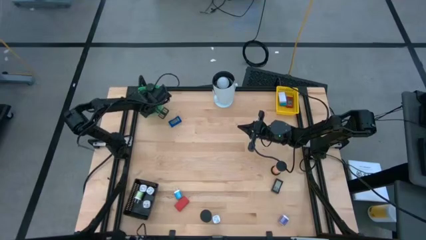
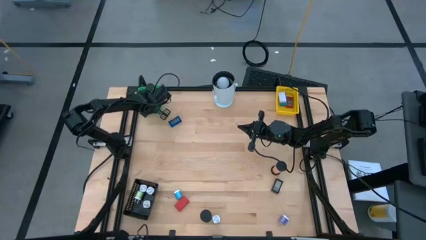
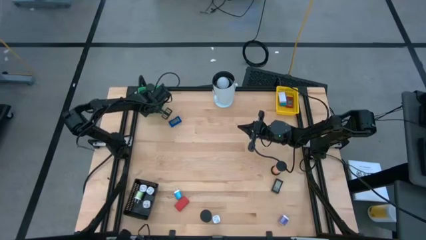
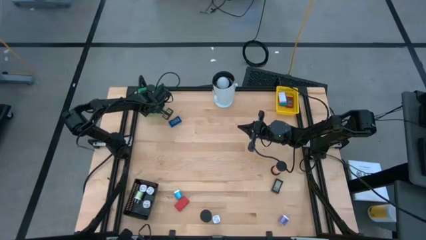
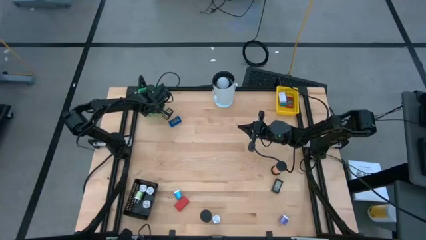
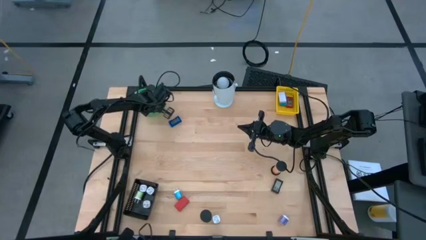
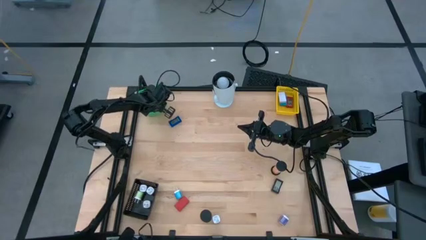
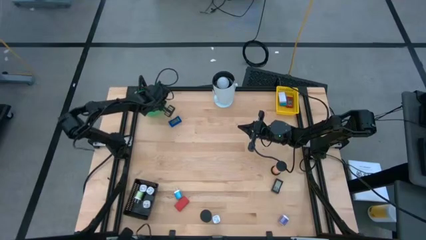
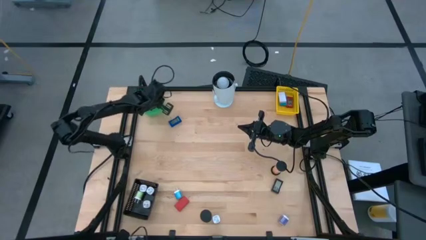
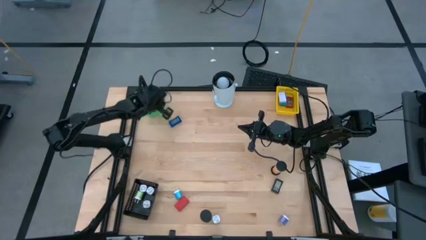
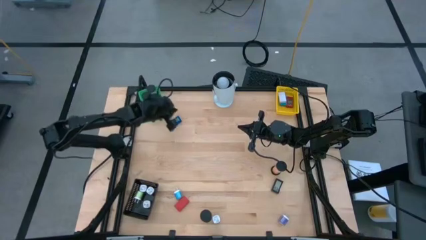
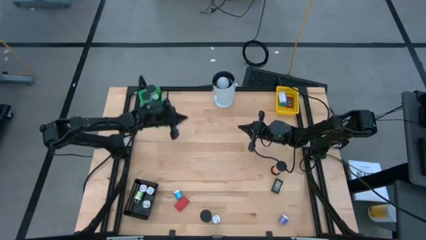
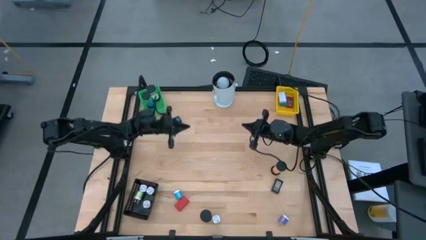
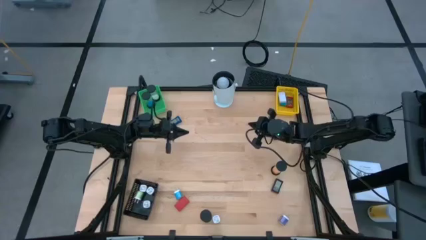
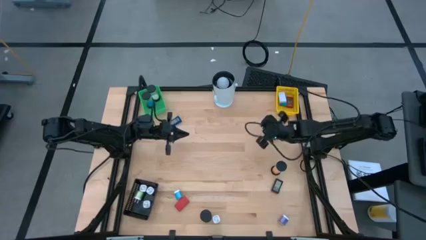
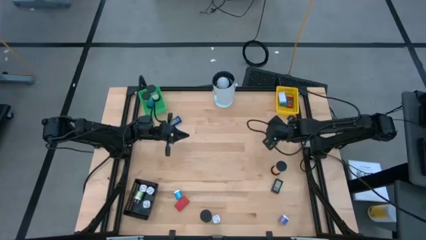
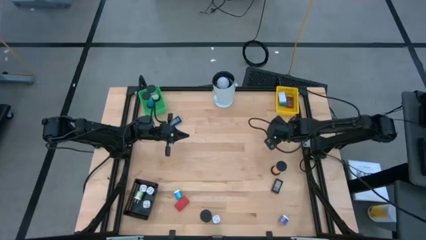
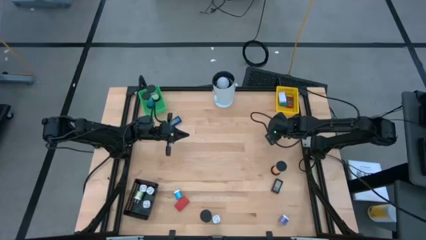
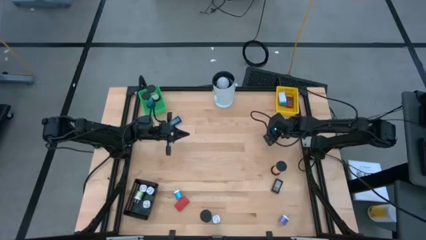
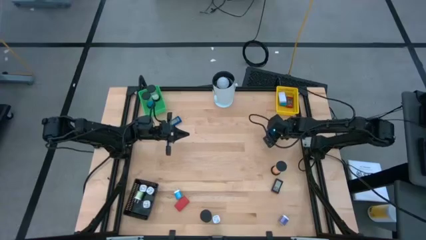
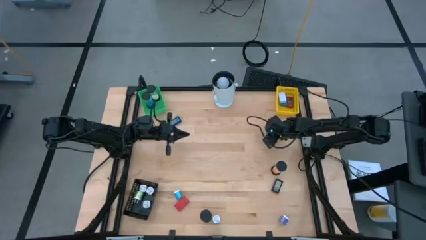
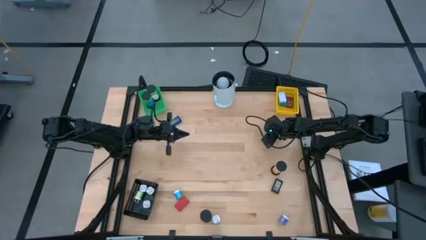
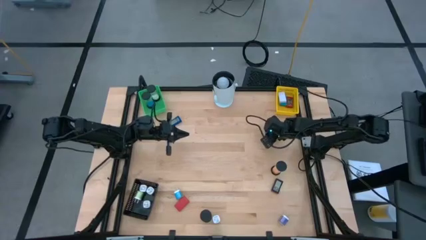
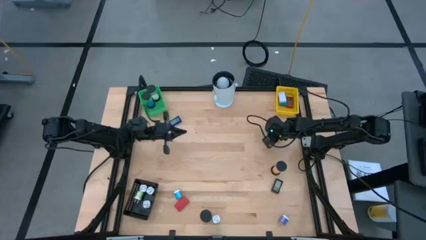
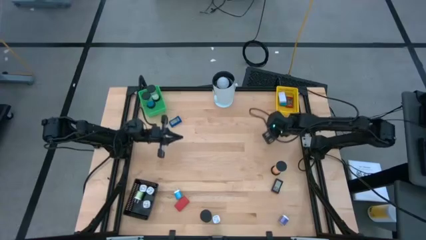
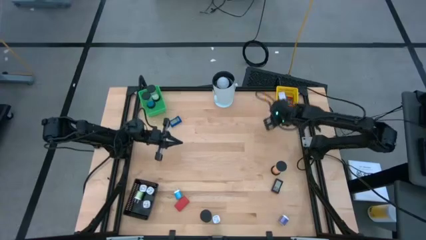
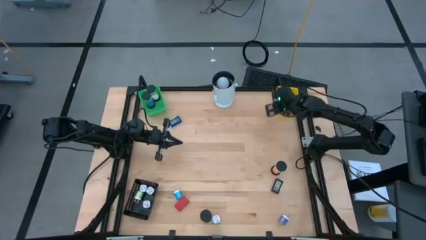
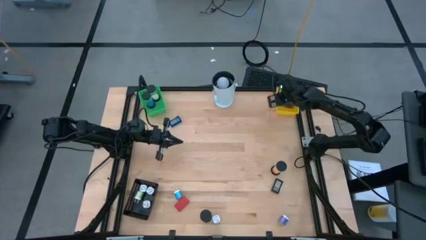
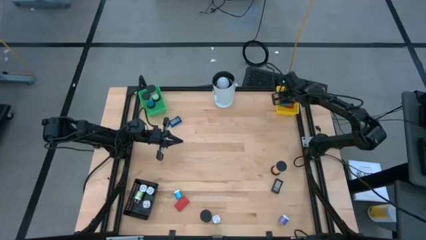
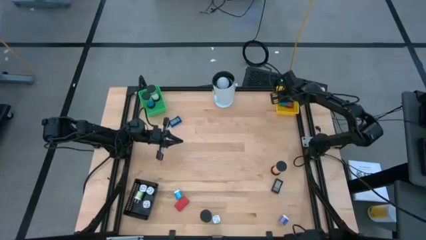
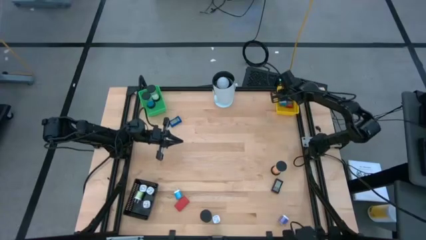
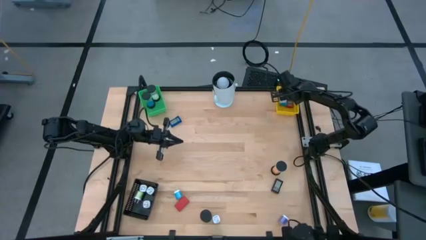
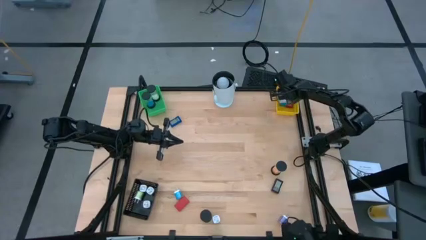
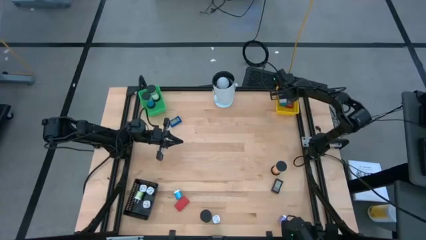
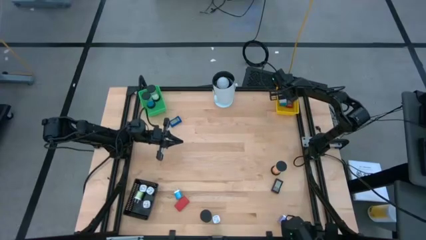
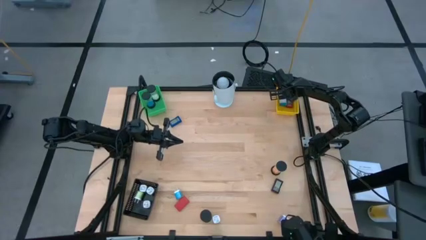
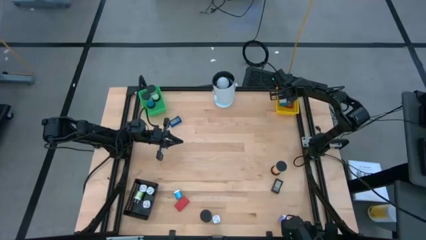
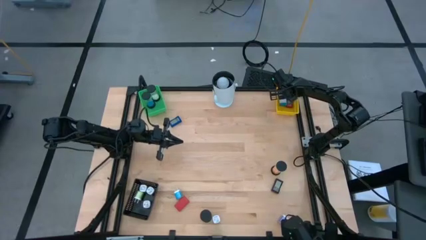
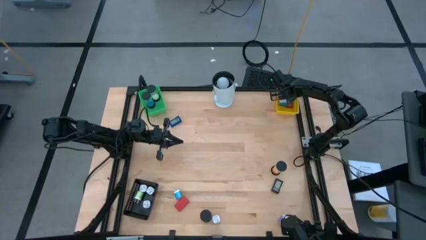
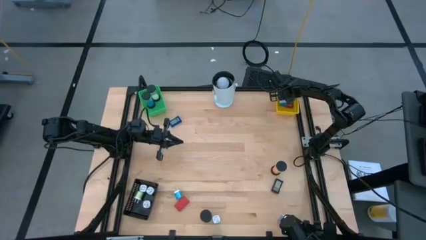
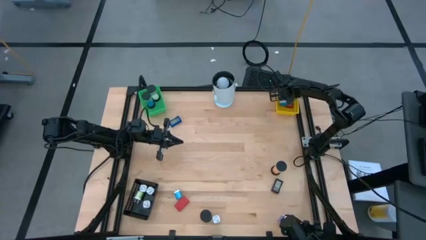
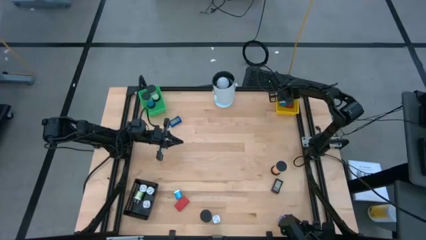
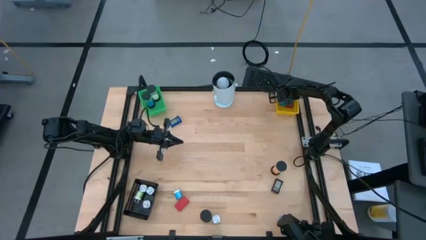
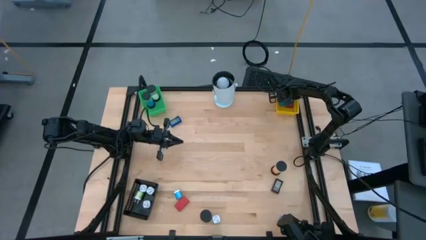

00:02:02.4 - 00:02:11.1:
Task: Pick & Place Office items
Put the right blue digital clock into the yellow bin

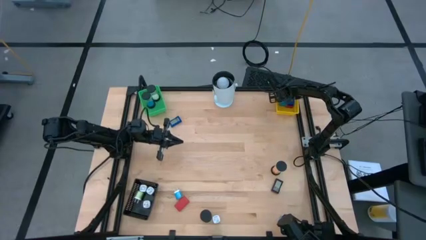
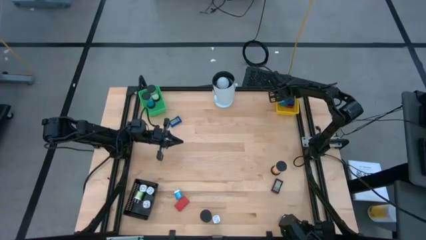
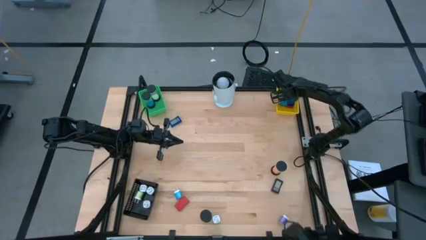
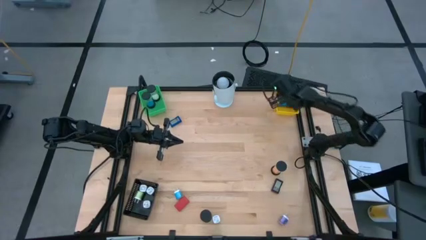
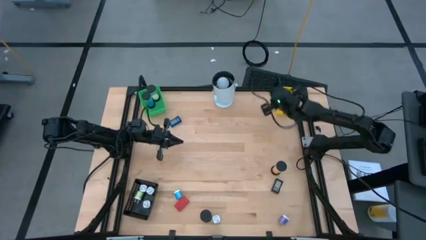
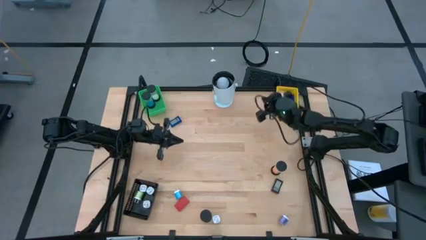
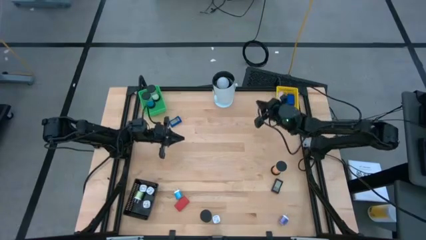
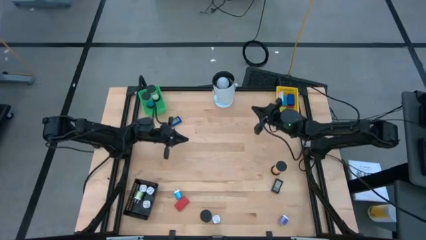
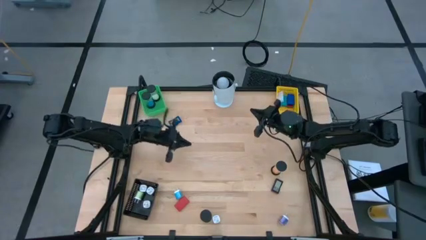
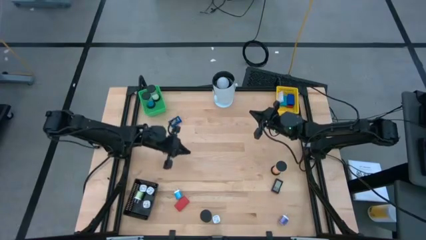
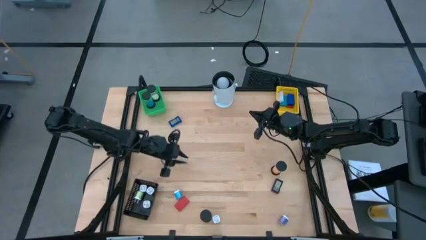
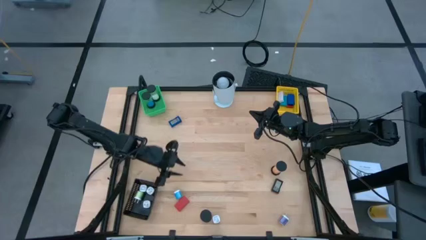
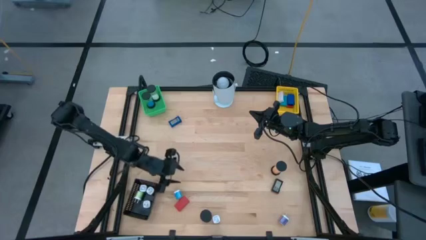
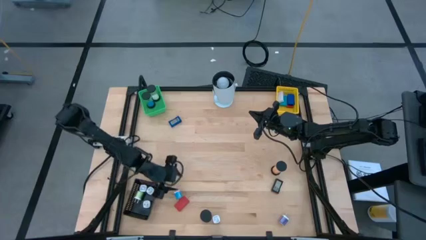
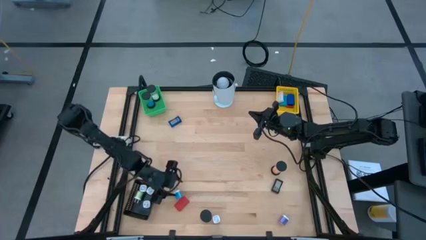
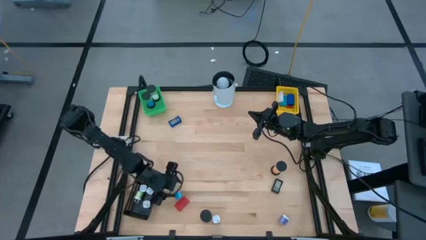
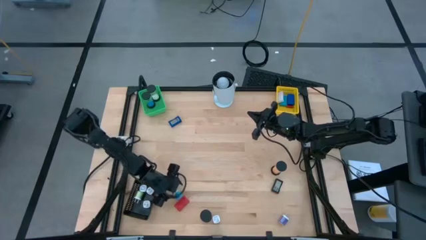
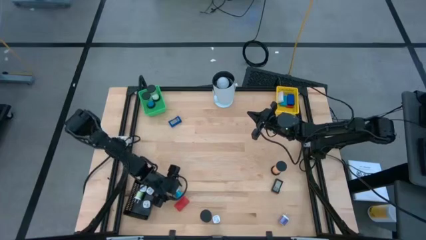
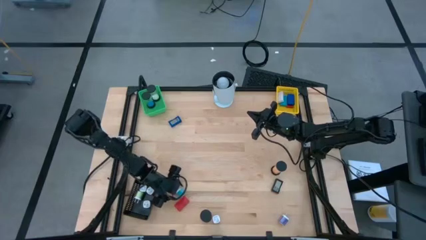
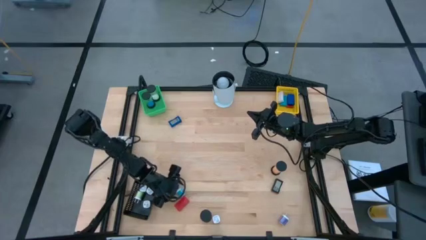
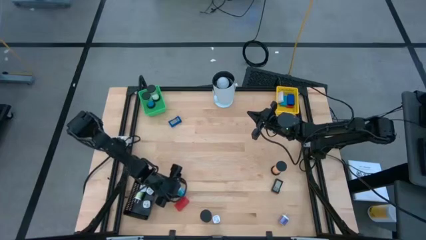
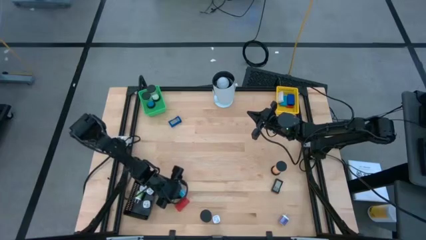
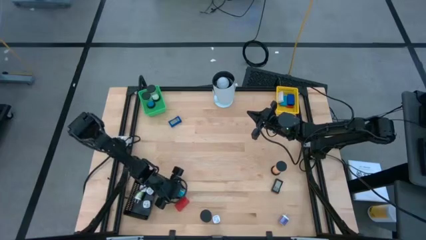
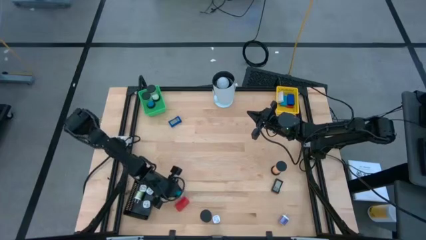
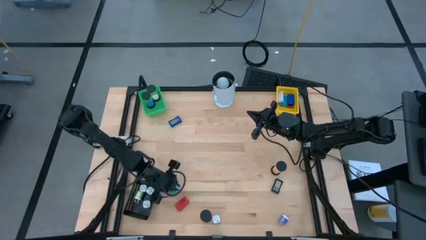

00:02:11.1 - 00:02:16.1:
Put the light blue charger adapter into the black bin

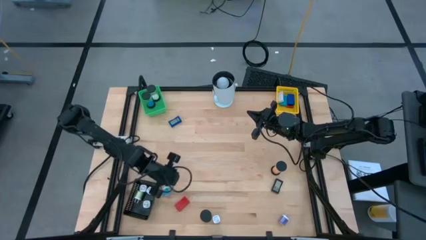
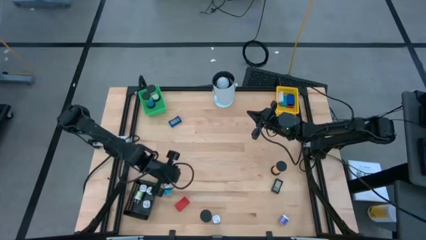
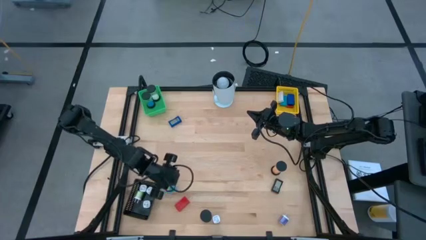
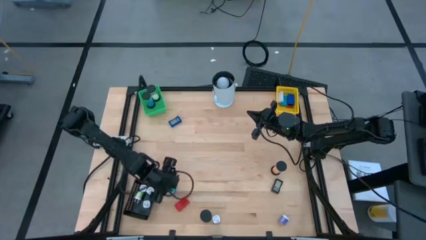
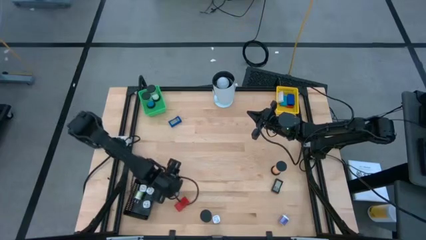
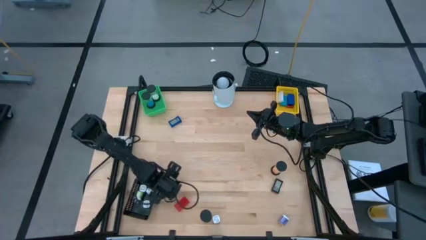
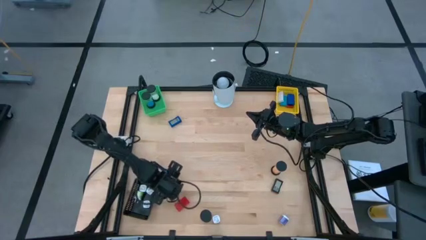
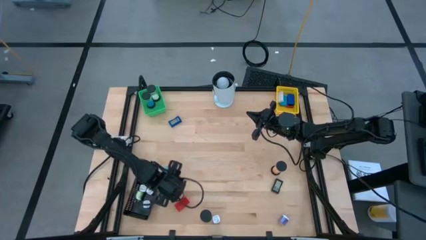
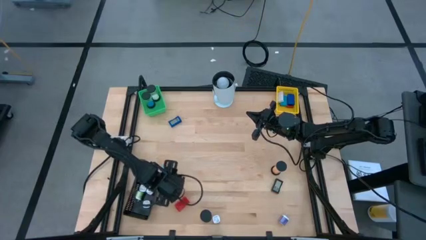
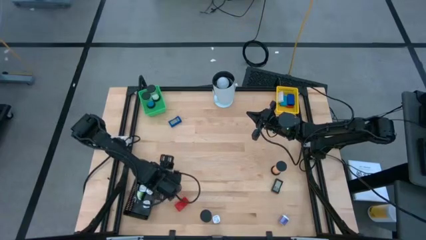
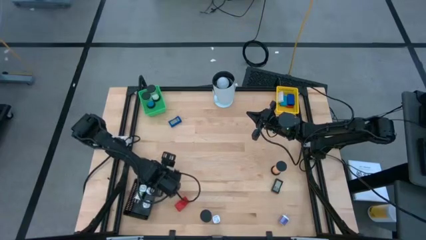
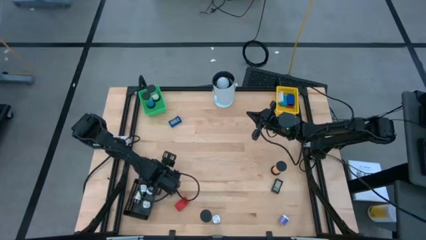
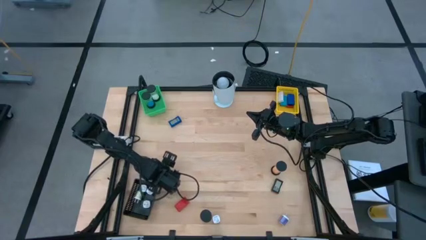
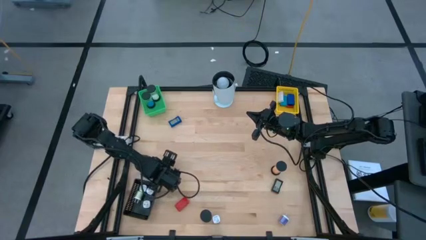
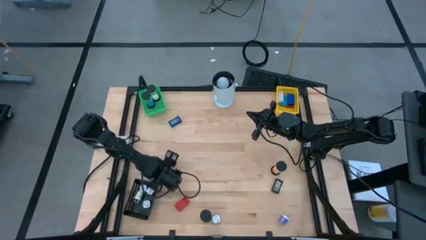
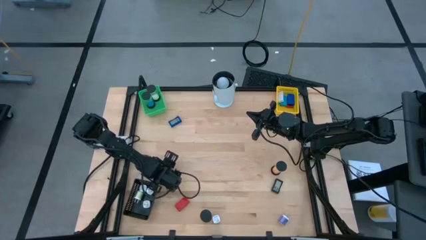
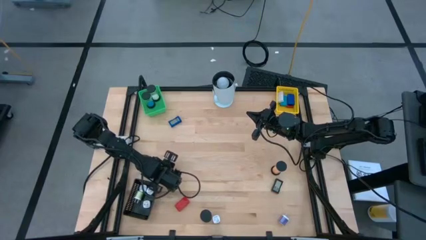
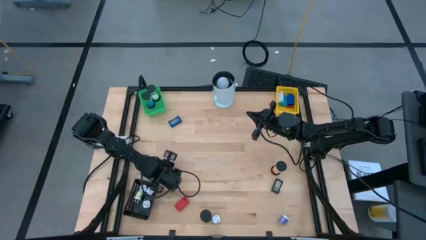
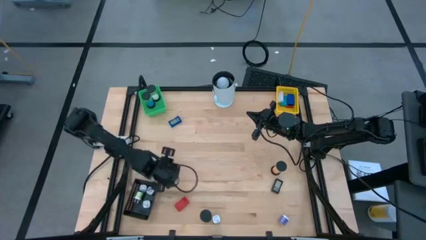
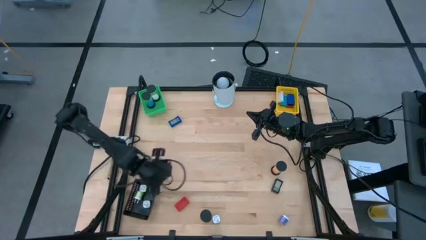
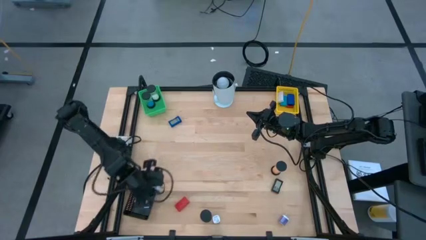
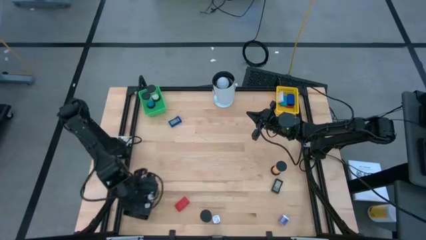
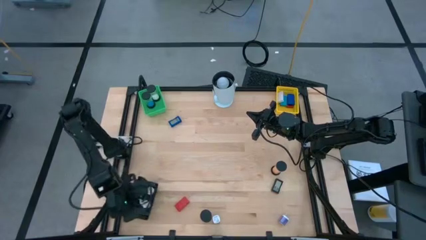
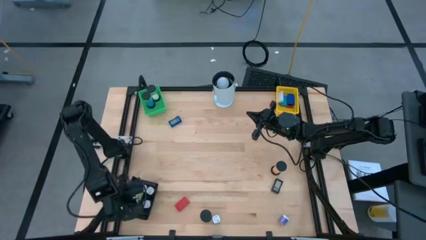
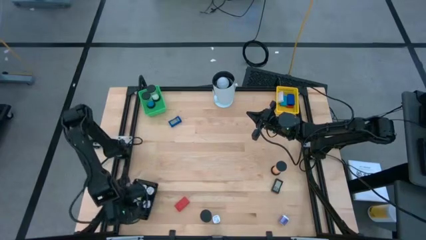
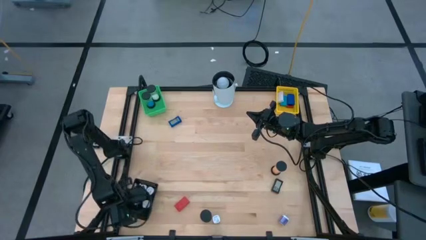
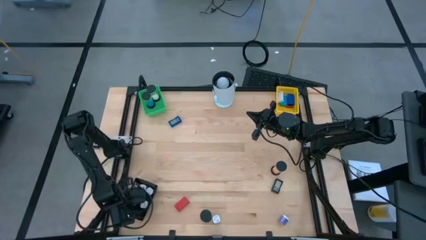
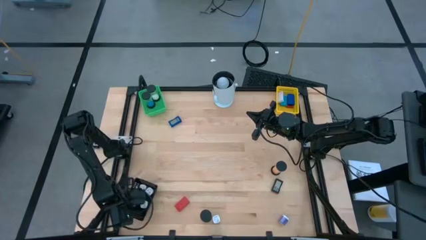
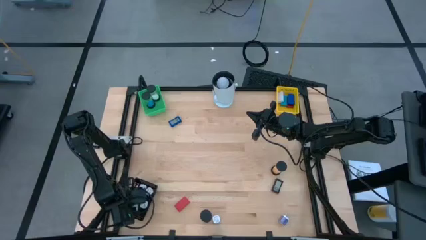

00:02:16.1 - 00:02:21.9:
Put the light blue charger adapter into the black bin
